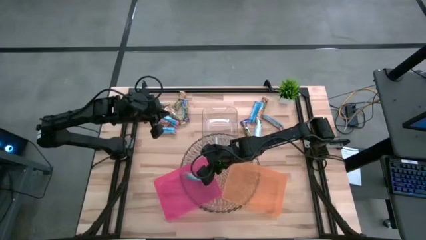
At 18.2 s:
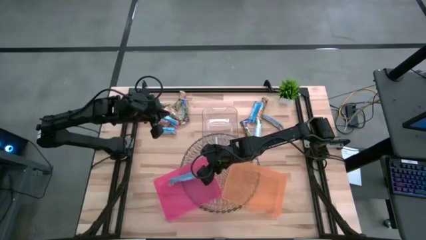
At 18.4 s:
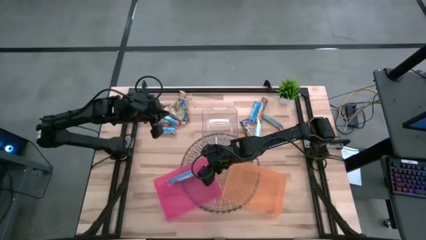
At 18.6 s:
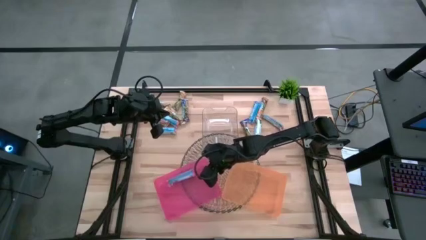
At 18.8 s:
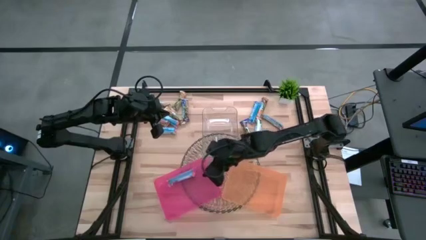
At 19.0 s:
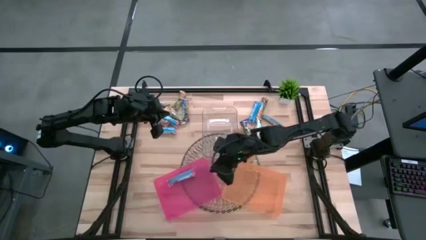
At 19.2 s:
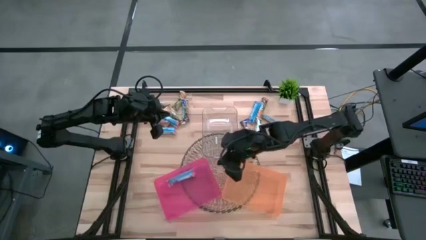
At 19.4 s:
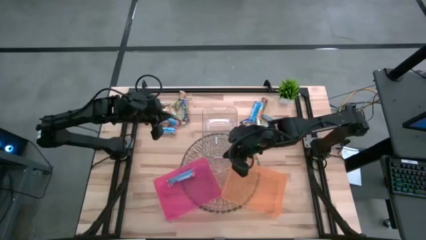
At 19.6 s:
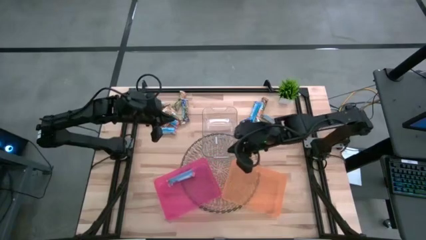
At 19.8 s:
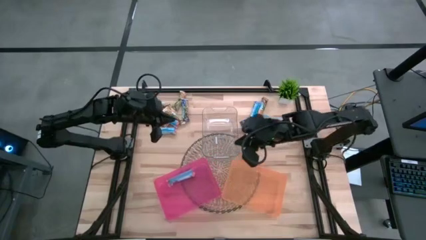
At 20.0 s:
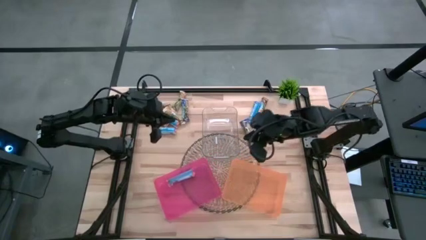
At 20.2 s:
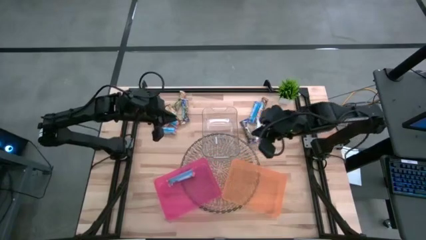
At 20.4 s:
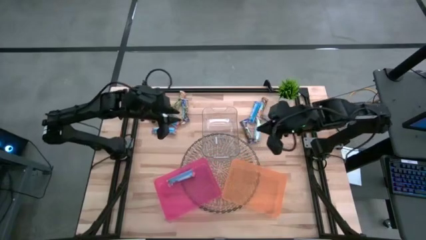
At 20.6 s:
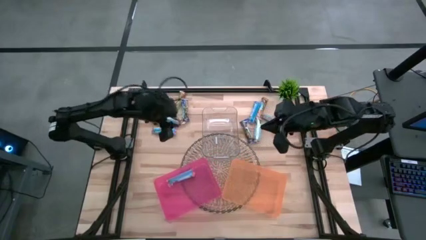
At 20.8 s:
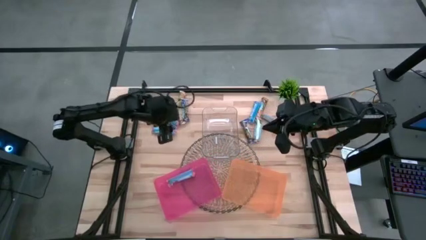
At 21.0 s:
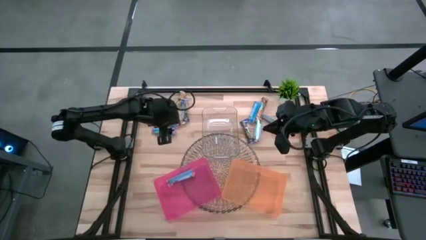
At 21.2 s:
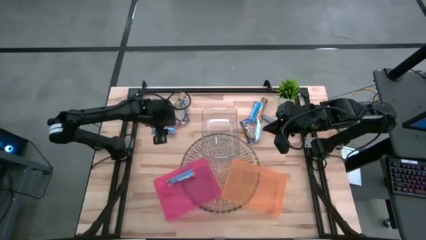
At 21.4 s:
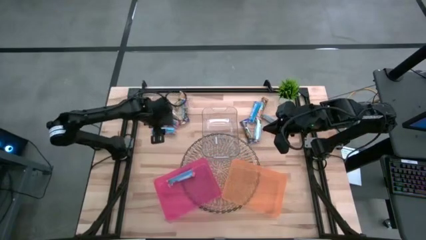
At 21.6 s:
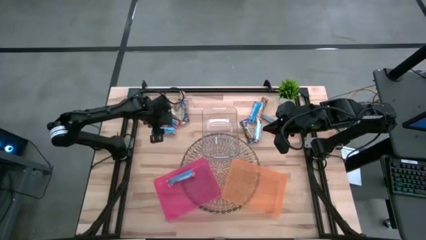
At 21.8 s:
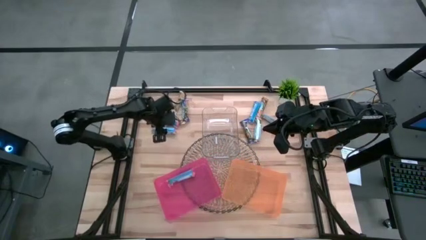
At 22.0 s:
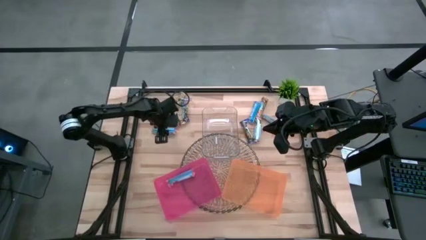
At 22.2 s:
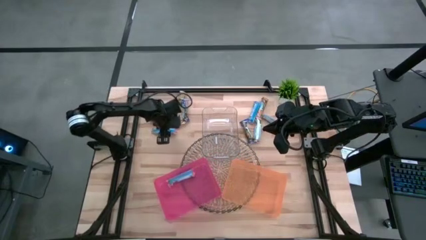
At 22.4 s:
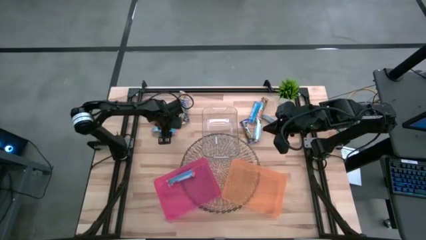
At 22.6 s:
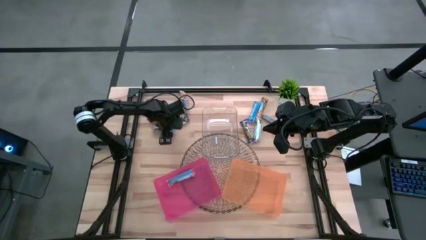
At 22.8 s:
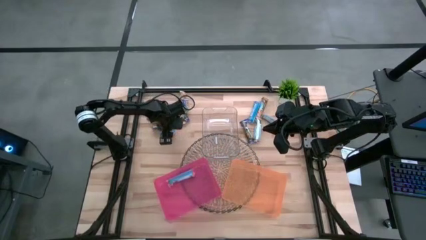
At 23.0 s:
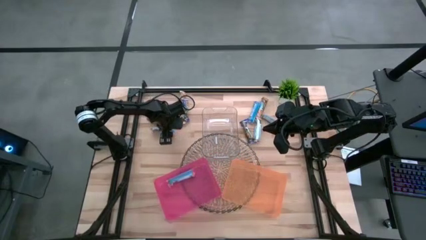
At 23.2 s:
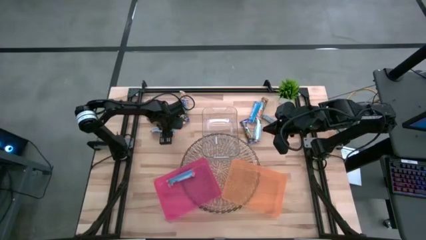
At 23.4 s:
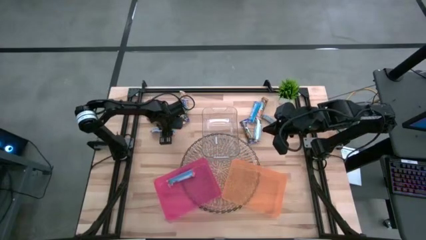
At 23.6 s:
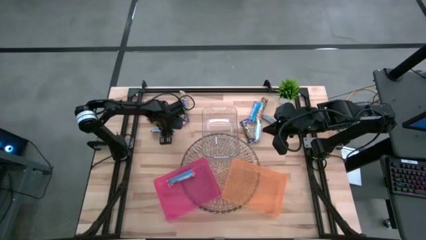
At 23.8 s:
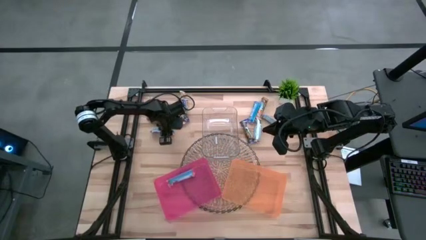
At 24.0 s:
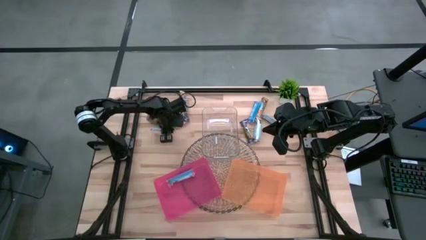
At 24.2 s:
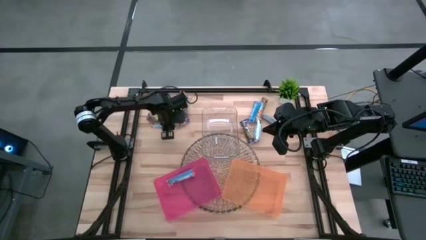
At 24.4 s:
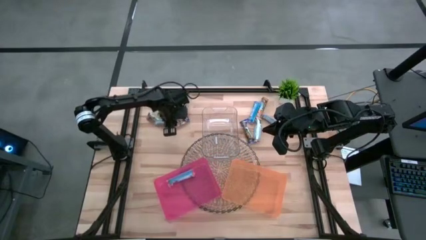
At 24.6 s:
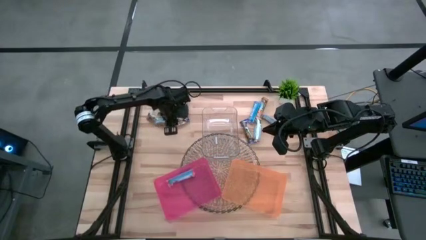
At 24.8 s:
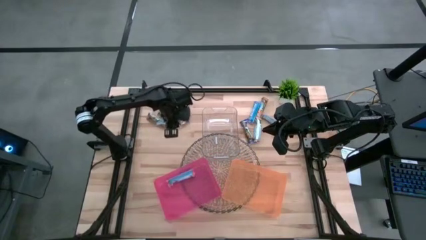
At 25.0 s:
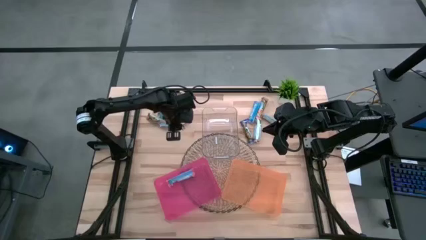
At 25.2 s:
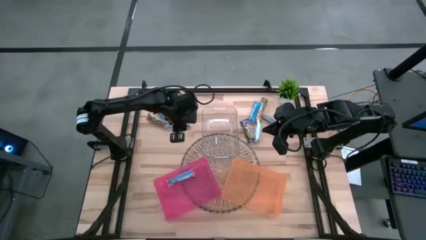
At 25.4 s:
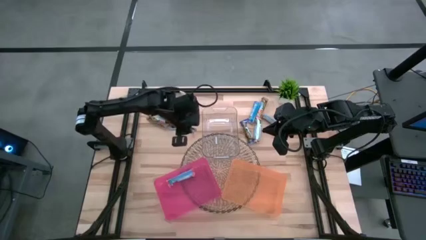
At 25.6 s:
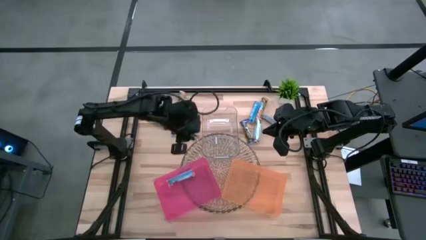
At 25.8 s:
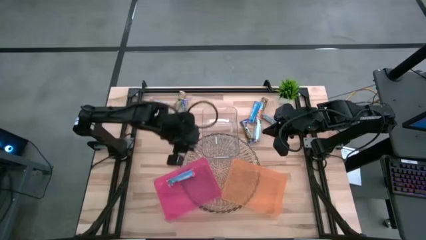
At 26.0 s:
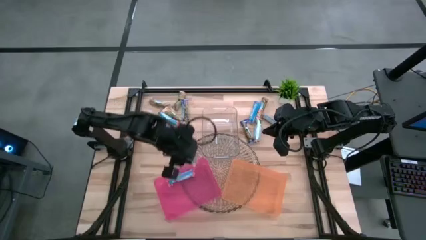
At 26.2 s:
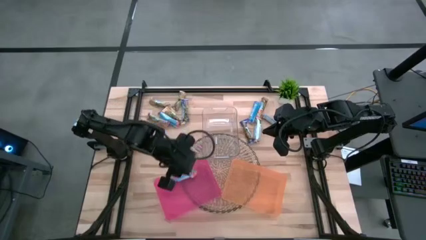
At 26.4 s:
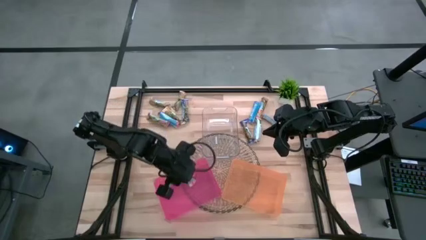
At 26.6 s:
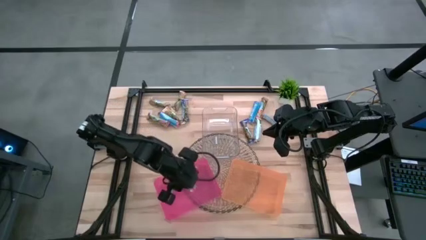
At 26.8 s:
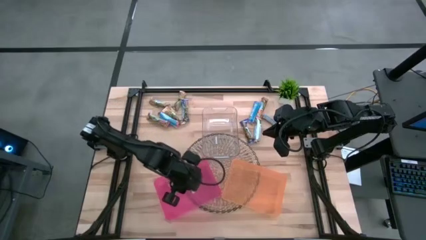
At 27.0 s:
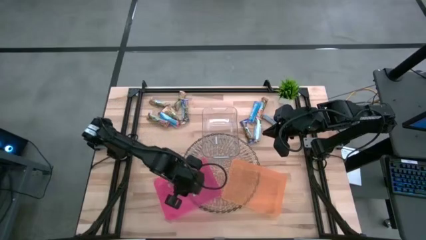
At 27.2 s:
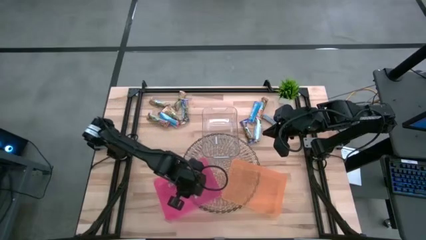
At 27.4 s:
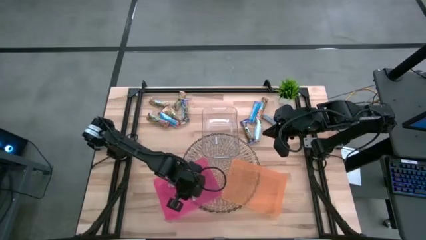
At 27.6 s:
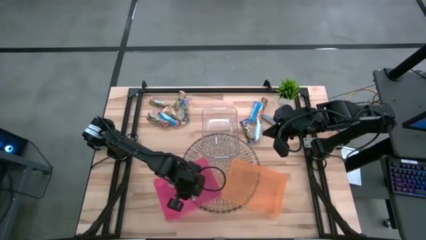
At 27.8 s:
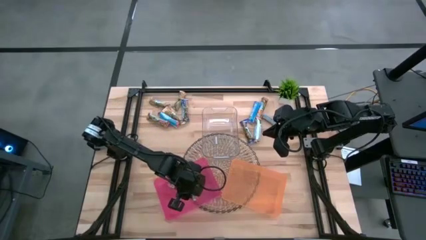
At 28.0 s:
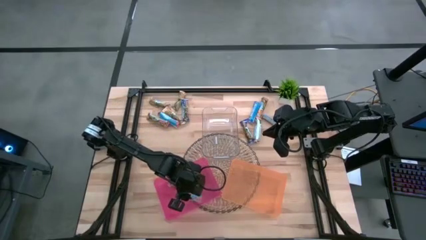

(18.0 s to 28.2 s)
Task: Pick and place Granola Bars by type
Put the red granola bar into the red bin
